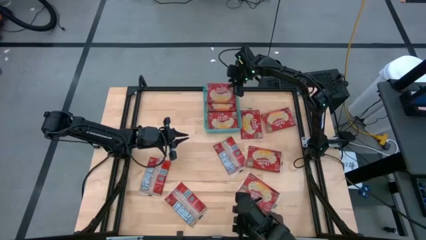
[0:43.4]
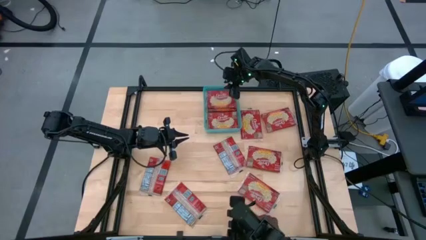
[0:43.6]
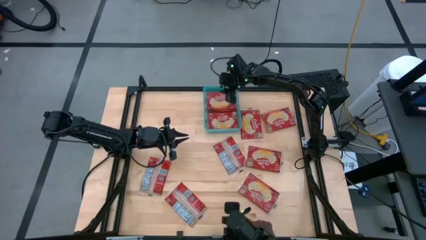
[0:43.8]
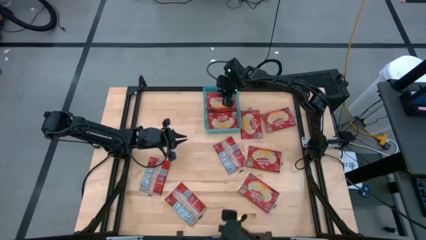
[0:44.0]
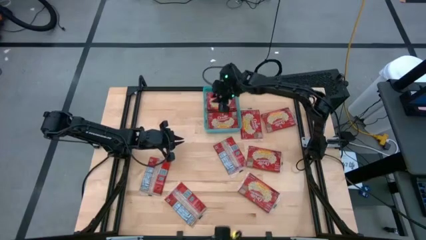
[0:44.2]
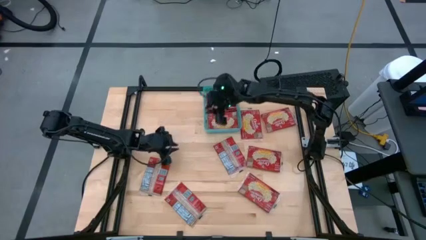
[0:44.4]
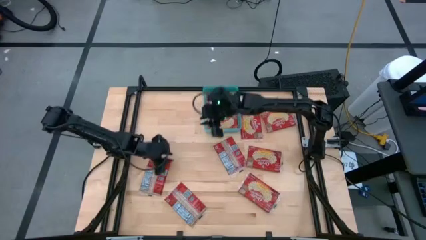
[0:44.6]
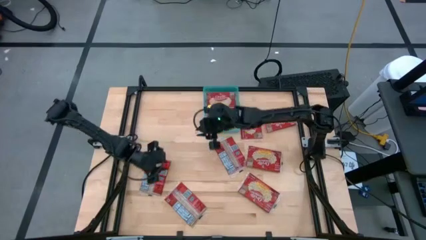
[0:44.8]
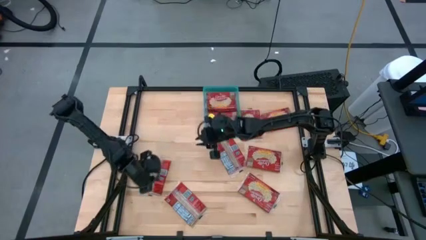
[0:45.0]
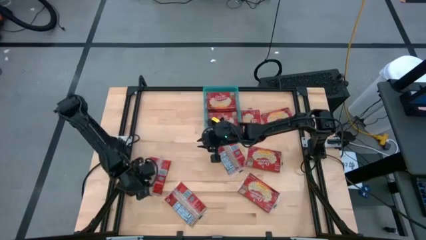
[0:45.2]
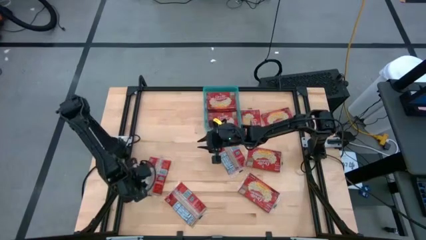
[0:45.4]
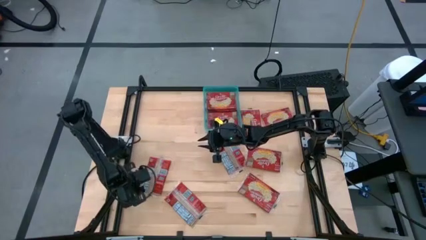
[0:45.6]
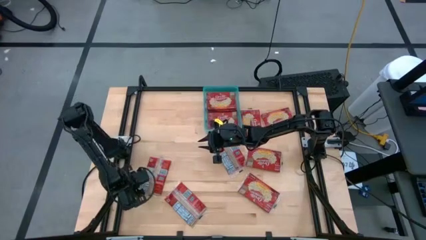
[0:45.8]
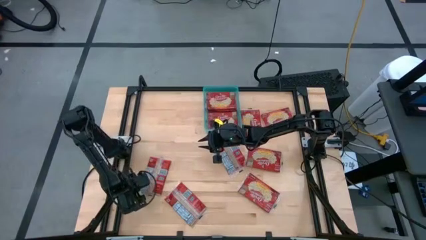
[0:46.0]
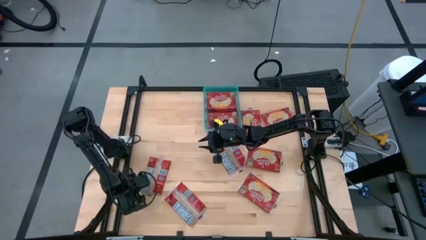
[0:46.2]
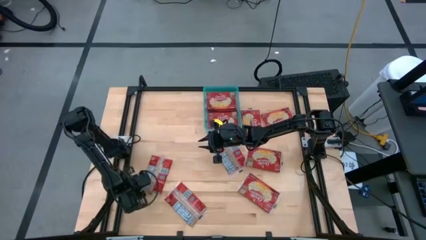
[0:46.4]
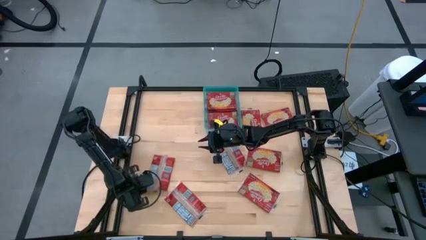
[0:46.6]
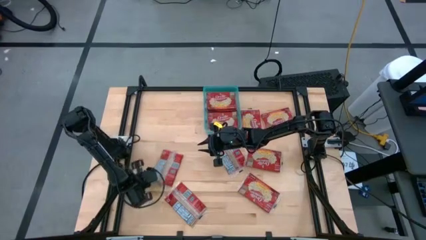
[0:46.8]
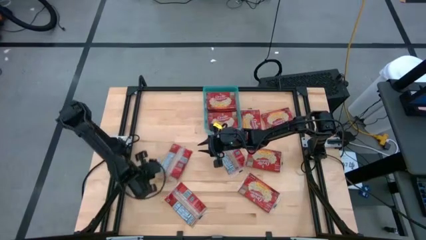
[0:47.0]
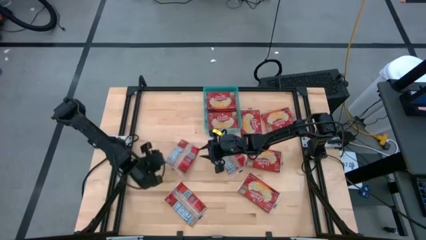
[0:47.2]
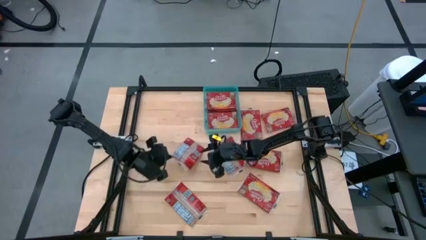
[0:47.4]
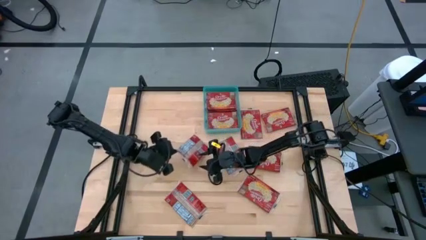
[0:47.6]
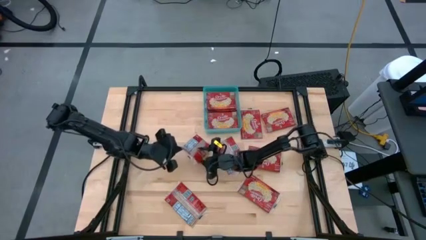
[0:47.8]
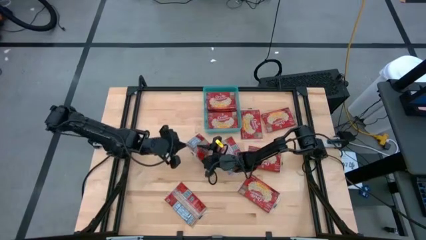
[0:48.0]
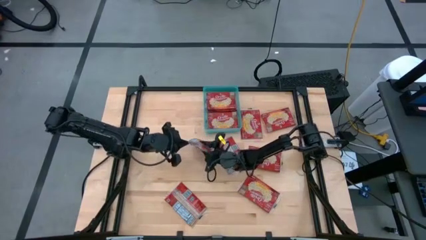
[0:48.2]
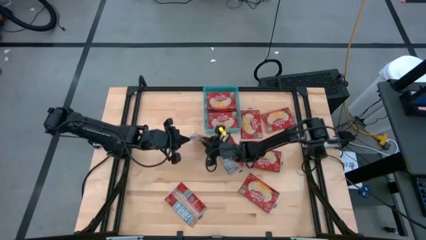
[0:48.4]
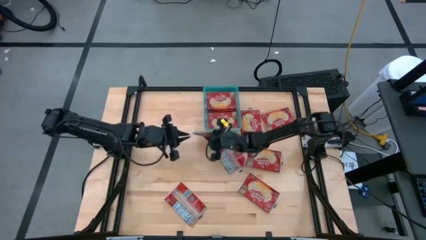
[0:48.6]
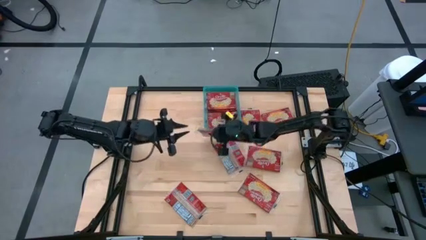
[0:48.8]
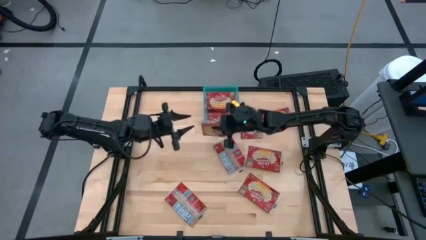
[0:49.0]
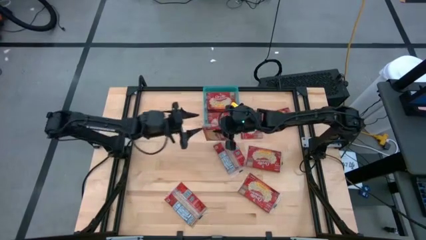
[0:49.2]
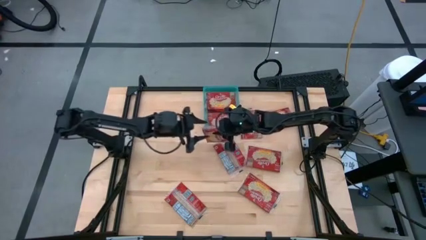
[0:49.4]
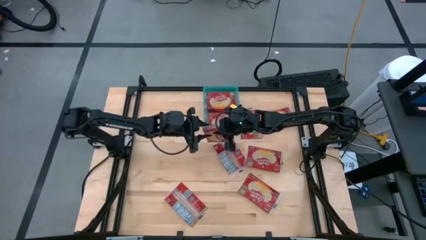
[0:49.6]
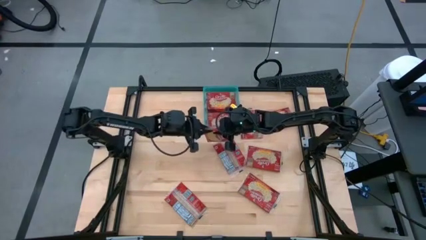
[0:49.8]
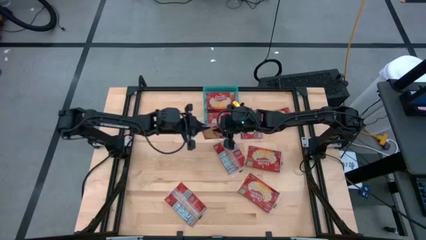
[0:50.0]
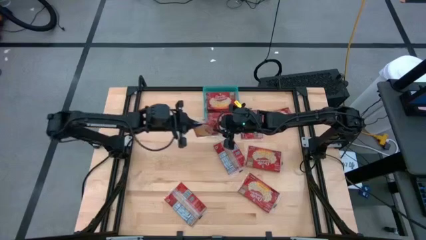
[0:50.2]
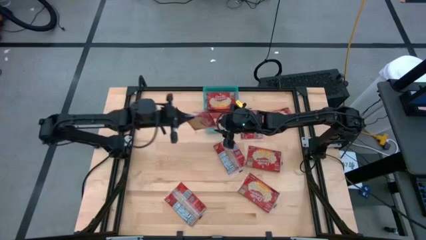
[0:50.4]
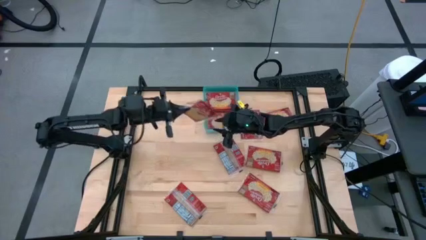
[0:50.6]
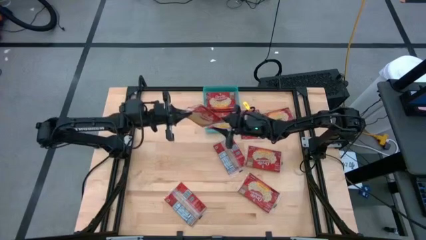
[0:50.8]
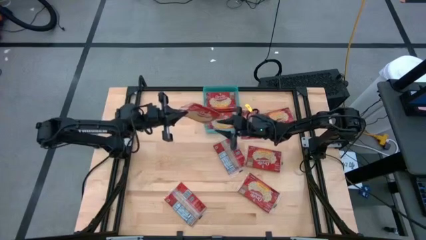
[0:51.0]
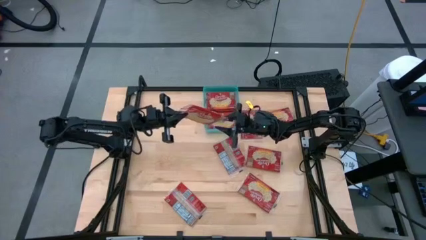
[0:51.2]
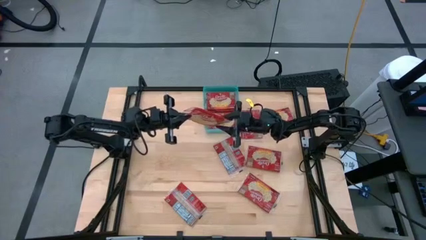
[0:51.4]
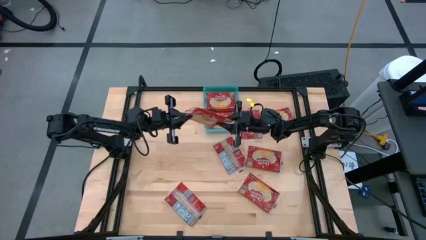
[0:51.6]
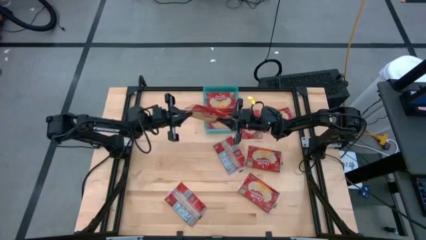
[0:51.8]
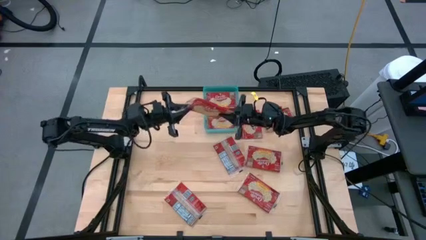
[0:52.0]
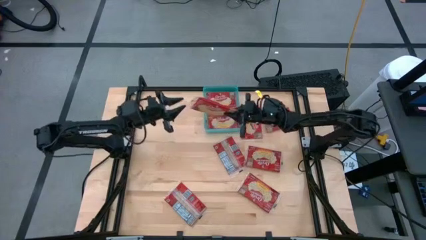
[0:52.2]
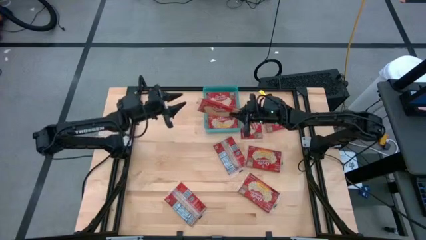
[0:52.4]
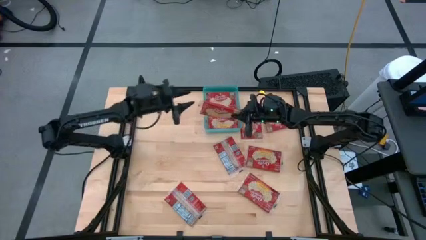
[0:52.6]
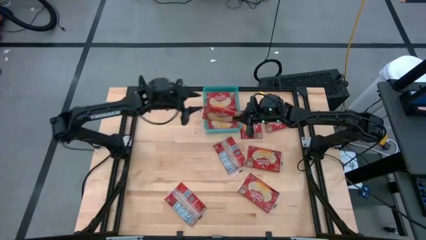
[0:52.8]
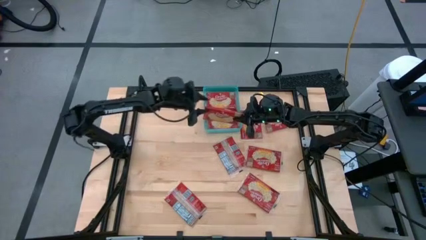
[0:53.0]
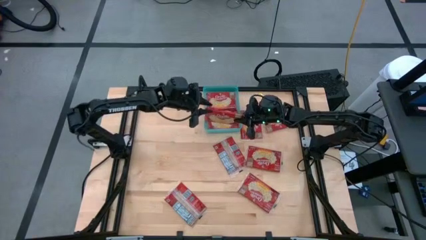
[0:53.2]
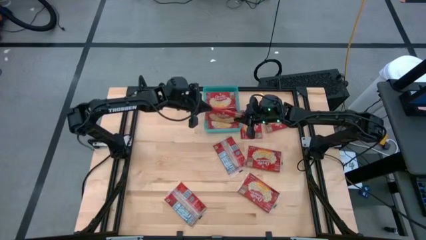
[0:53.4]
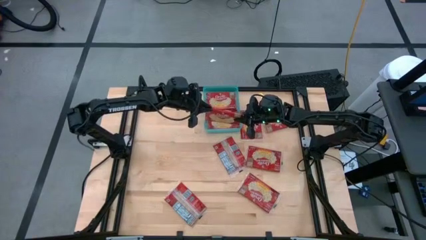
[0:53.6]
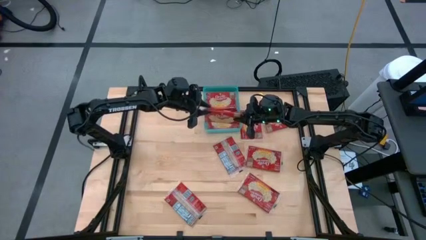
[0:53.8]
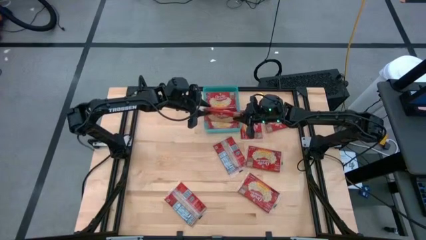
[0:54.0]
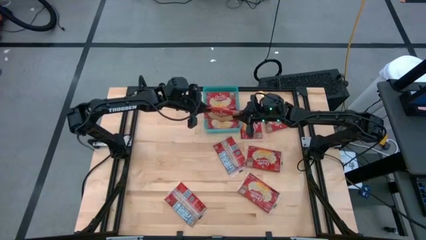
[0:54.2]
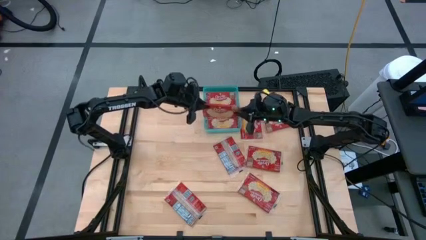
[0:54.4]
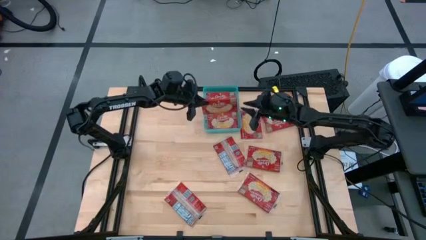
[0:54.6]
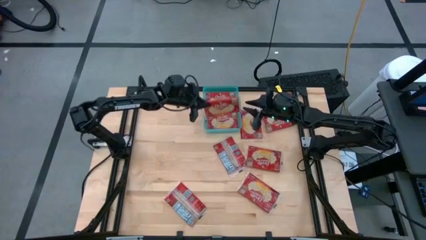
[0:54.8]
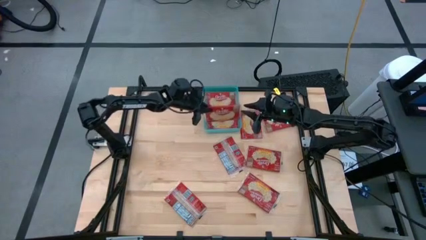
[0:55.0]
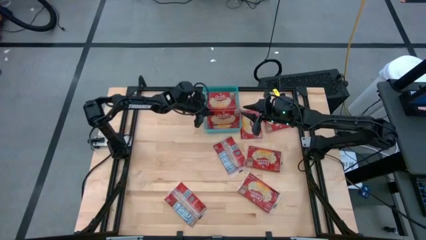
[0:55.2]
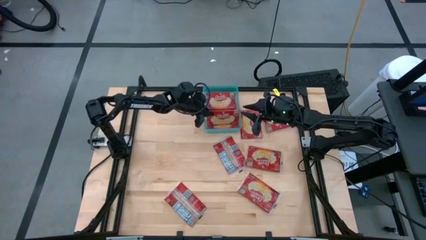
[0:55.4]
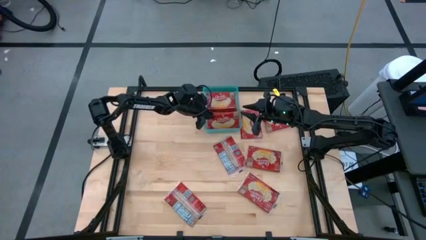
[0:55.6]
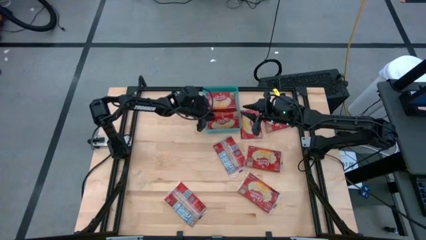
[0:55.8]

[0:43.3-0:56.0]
Task: Sort popcorn bags into baskets
Put the red popcorn bag into the blue bin

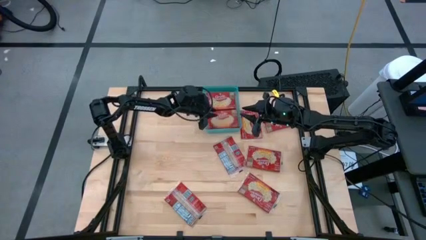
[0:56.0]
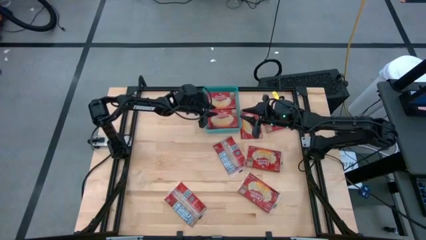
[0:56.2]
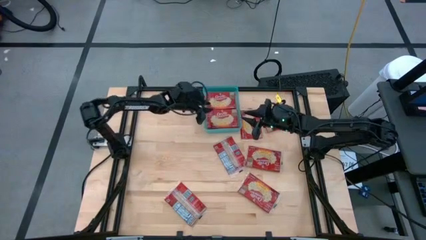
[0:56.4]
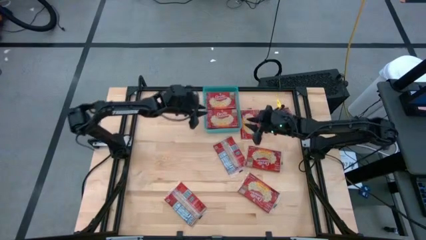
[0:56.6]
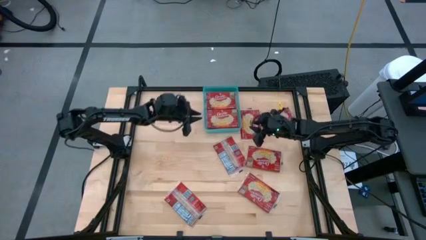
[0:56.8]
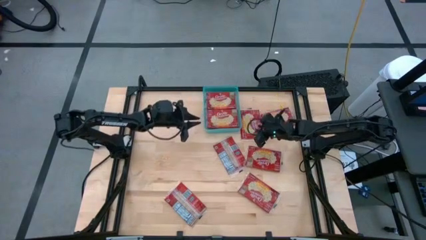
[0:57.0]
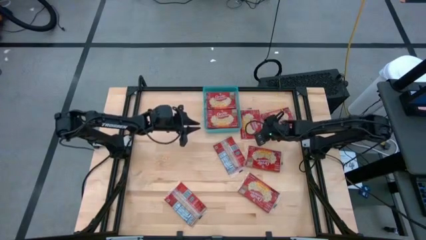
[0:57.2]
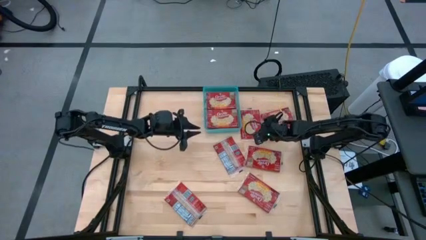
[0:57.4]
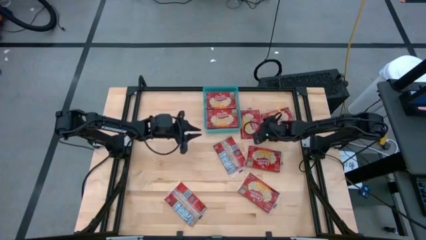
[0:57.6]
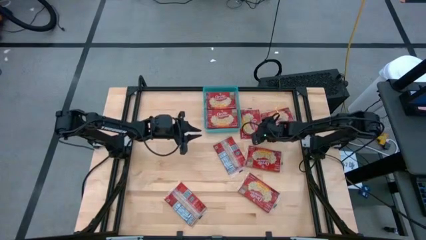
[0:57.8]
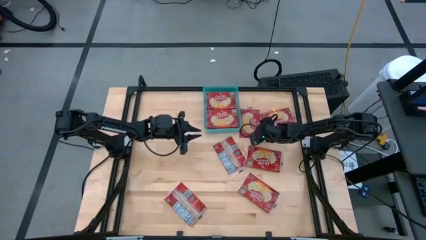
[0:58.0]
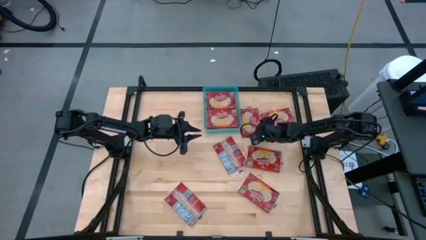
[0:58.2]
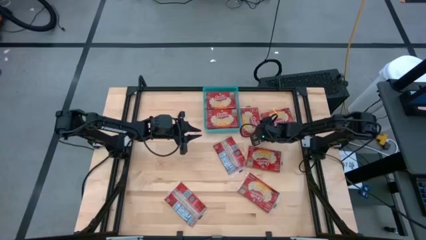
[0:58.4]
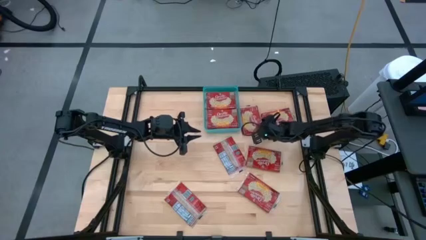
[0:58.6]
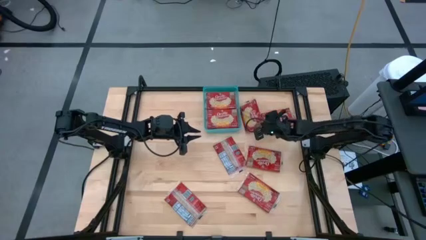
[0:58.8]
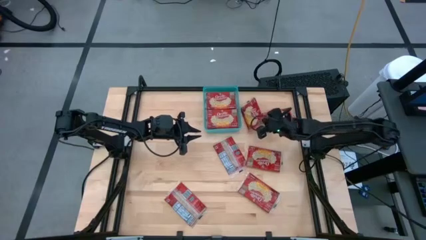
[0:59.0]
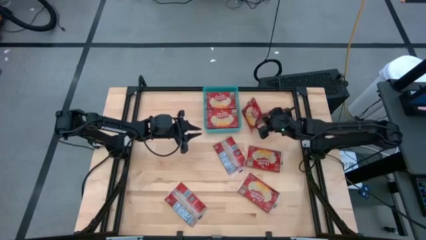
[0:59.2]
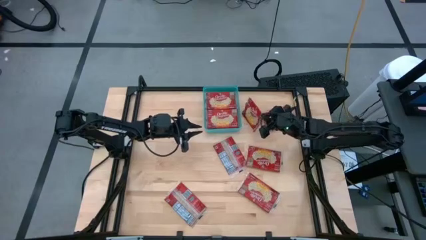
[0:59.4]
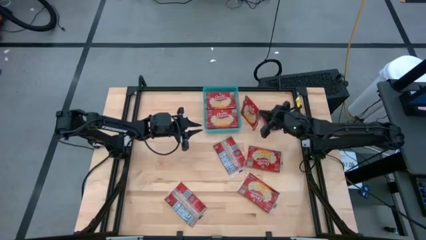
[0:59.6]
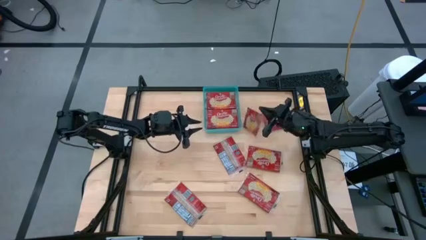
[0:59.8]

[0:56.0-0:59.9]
Put the red popcorn bag into the blue bin
